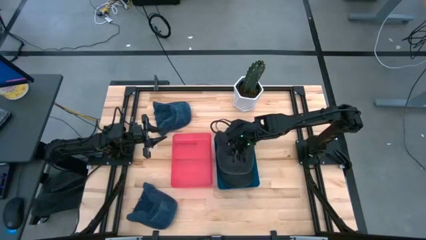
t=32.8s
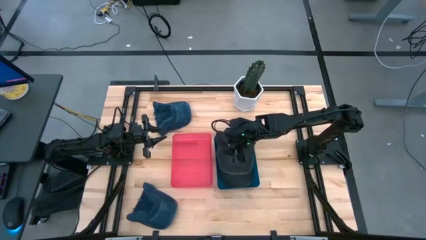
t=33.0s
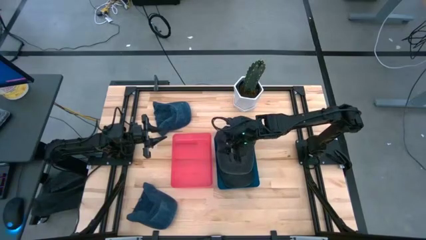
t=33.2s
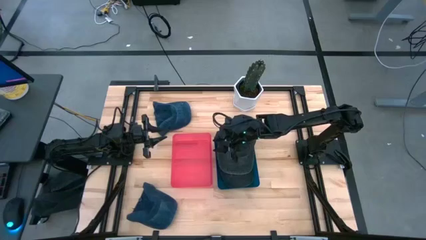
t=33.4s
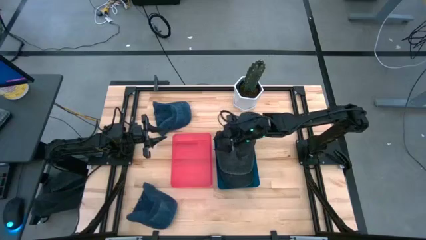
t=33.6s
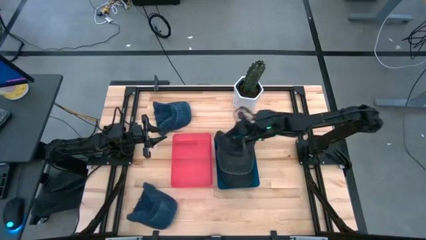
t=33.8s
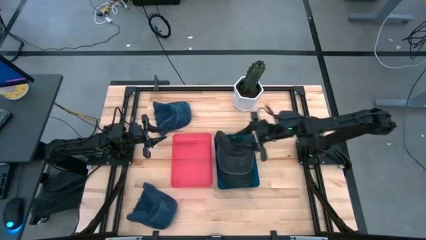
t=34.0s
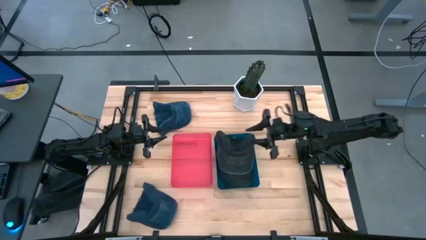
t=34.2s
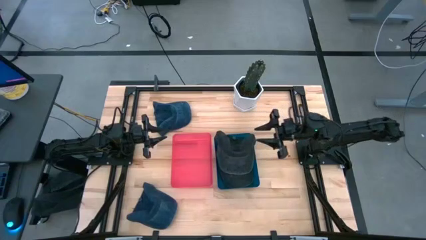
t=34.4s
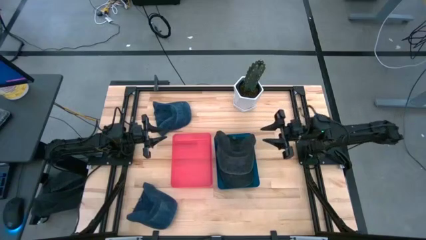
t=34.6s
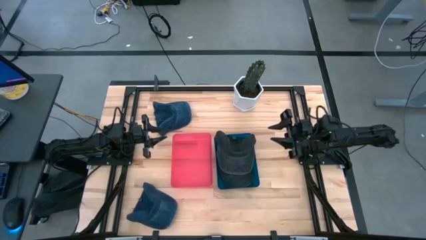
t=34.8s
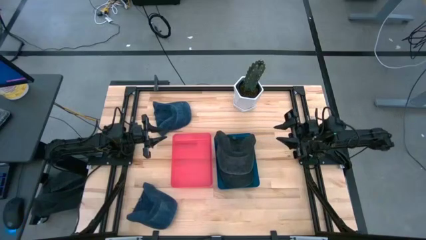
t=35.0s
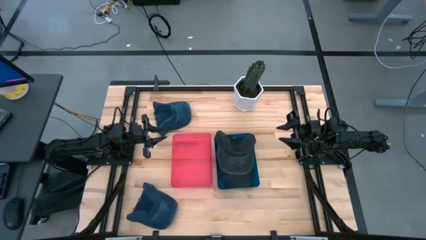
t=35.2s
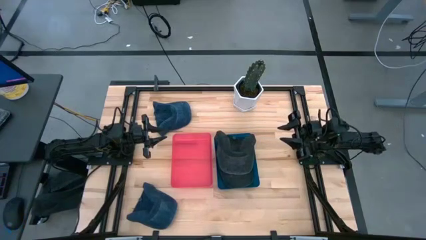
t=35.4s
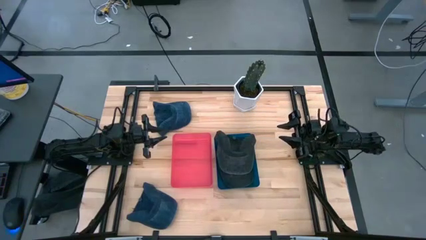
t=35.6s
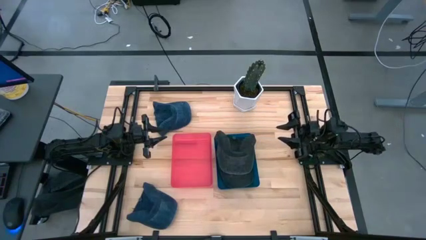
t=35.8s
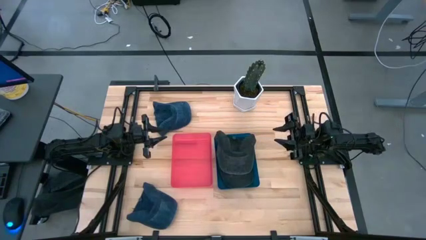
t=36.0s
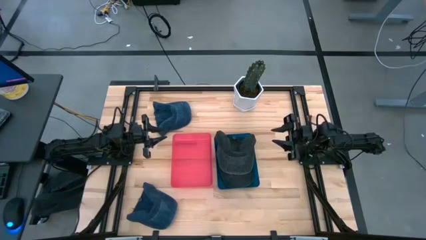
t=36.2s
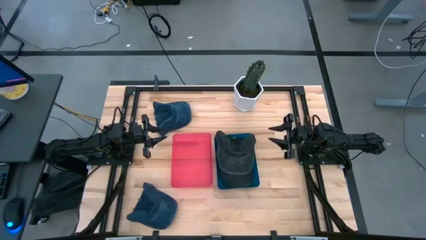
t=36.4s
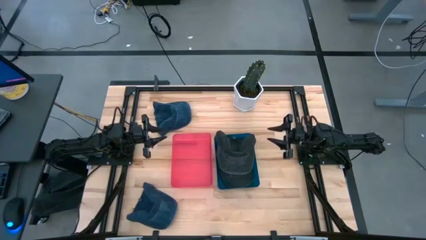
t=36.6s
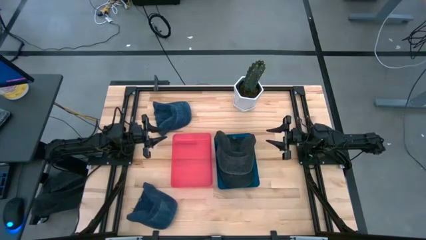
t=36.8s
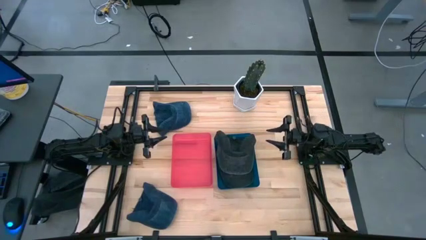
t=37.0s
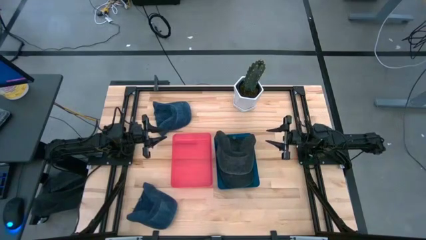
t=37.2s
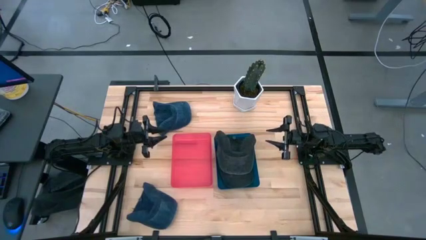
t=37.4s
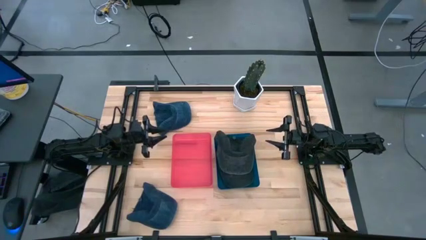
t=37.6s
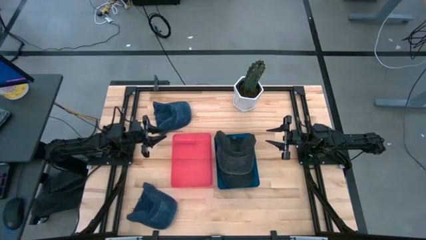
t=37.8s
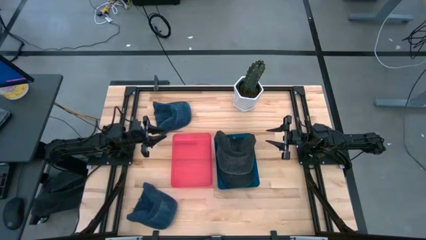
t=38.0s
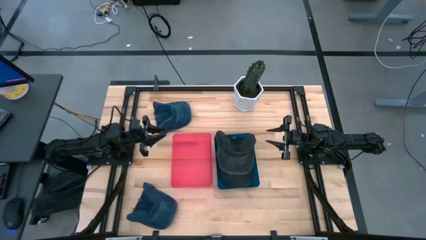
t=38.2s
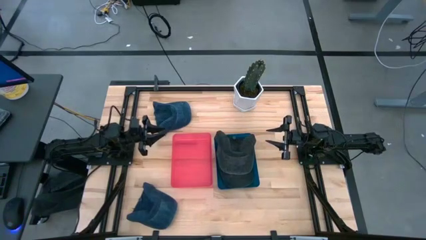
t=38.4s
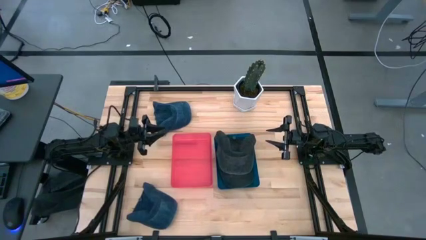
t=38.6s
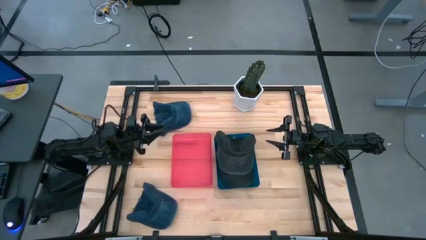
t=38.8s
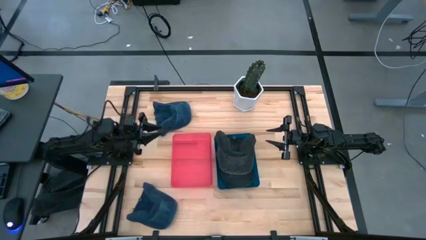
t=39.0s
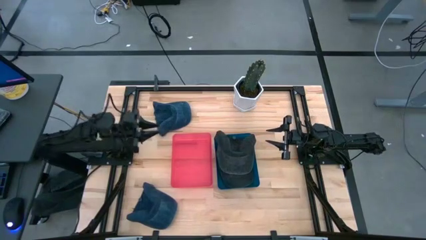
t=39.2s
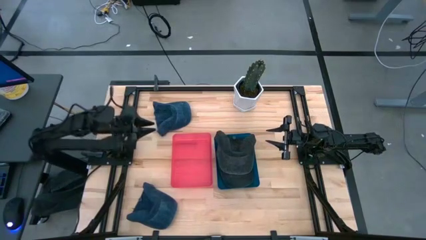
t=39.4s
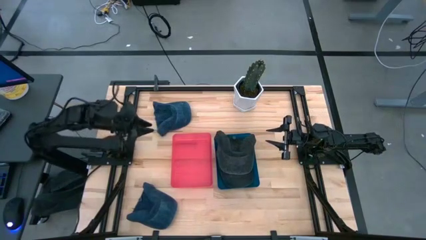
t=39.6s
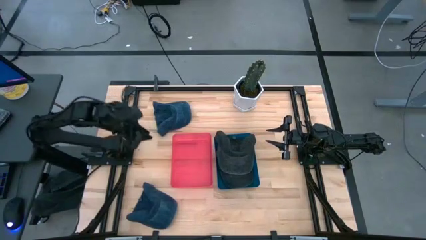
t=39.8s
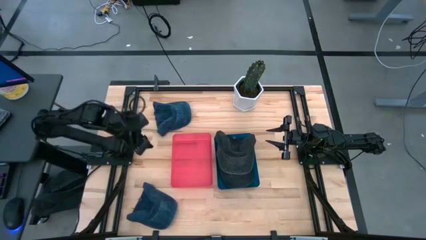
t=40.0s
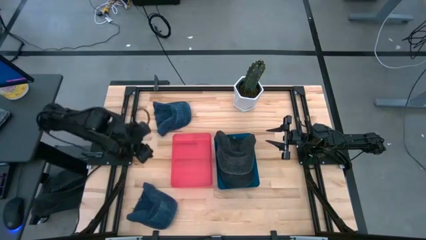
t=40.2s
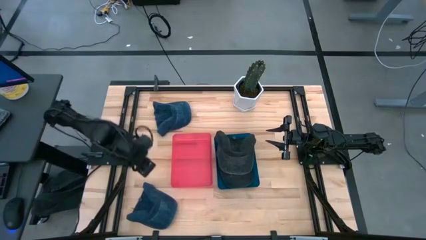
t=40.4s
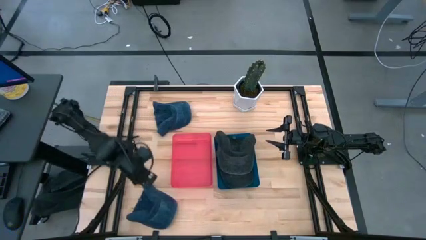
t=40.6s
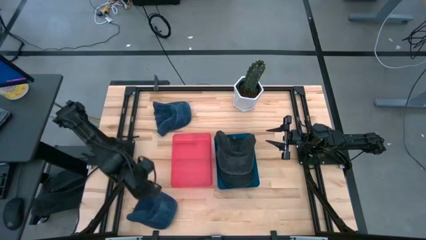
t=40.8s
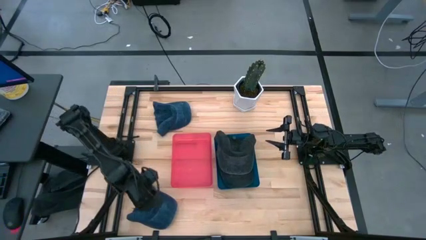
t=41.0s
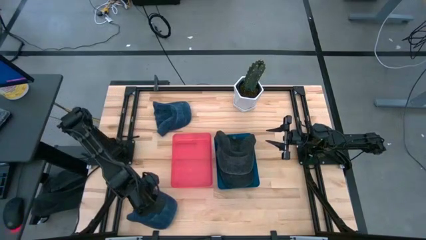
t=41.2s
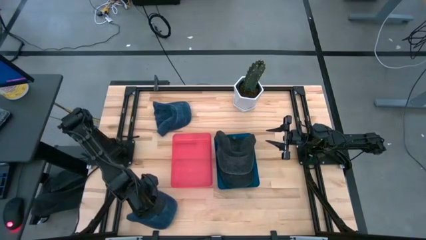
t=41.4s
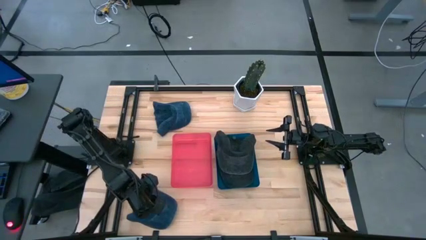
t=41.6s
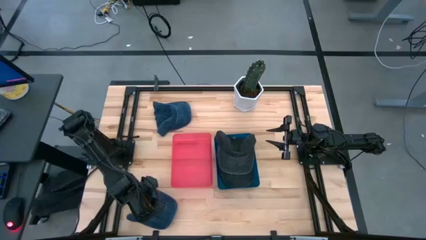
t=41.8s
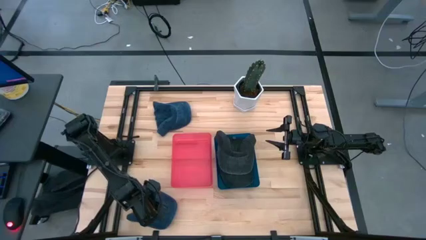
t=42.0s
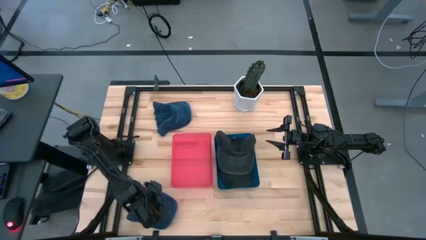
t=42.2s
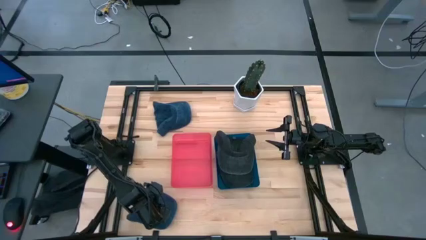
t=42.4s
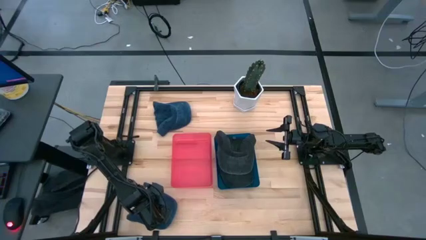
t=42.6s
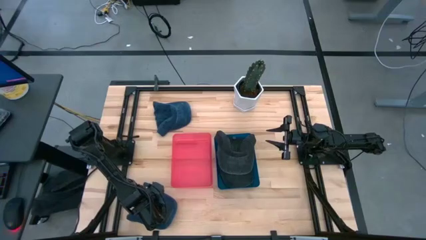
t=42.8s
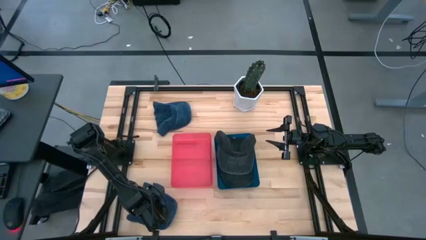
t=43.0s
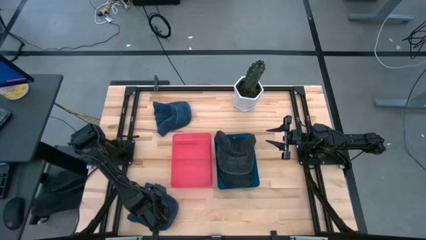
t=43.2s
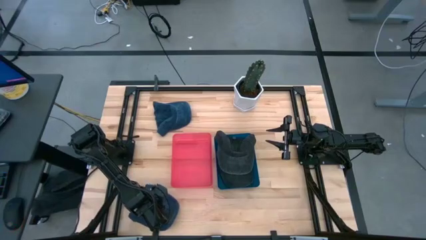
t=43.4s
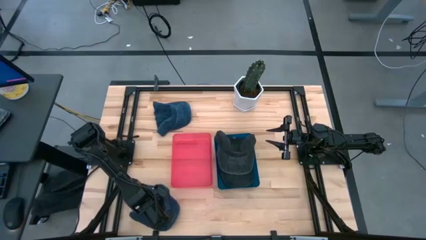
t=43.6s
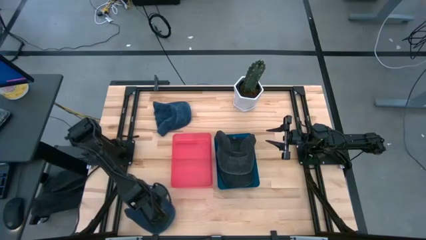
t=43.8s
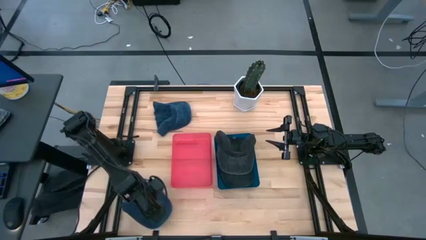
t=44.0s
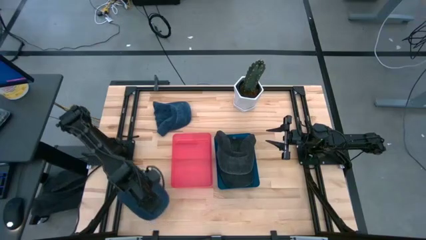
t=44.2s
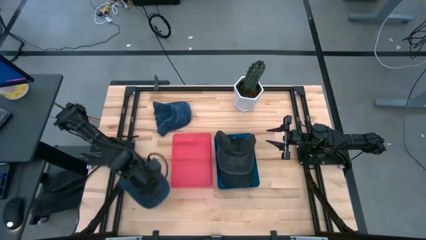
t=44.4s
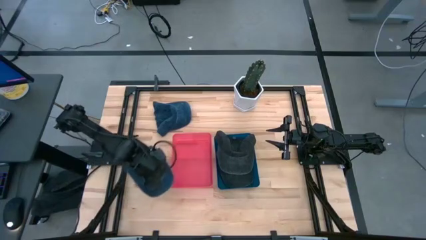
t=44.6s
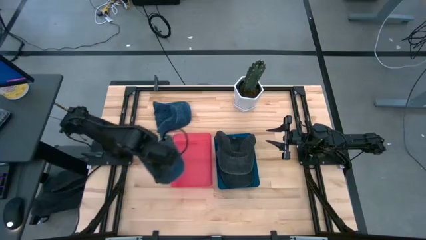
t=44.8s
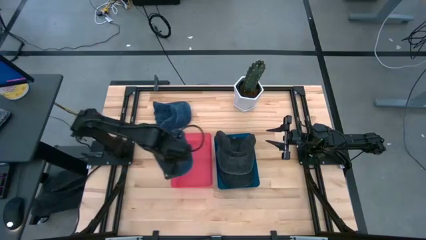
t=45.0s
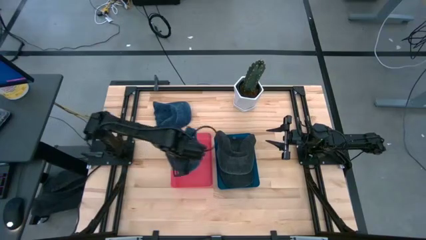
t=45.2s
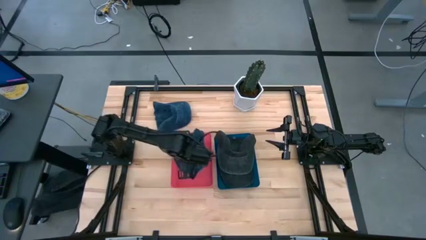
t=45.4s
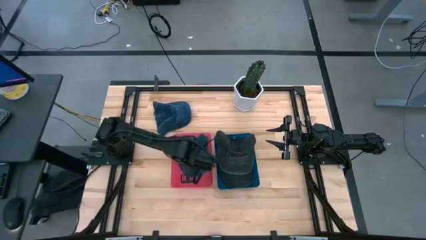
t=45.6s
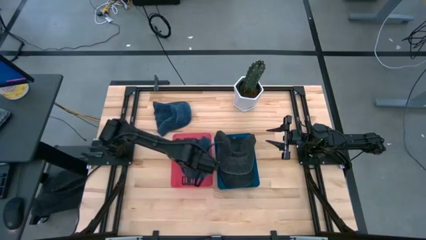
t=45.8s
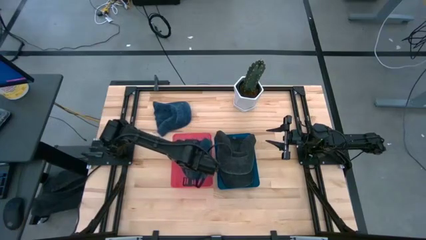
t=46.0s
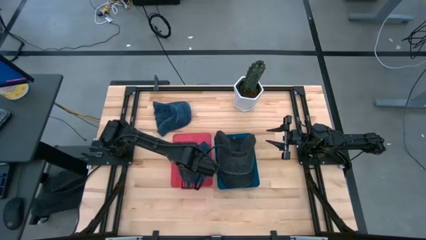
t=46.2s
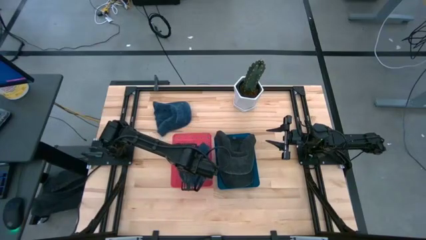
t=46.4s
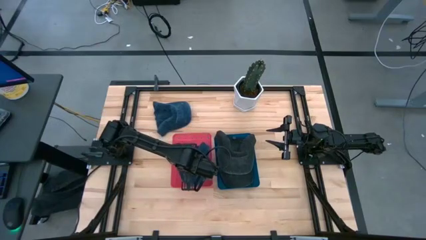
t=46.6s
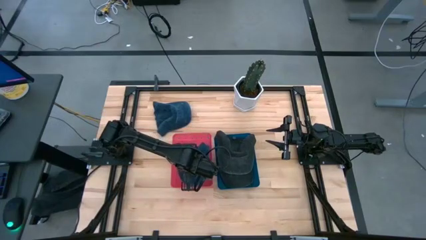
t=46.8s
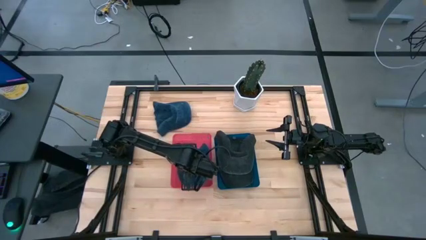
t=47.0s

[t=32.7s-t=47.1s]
Task: Pick & Place hat
Put the bottom blue cap into the red bin
